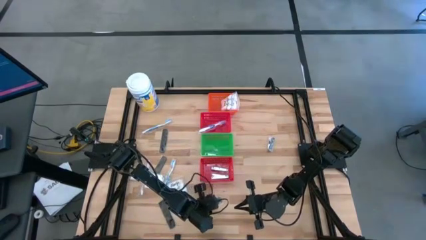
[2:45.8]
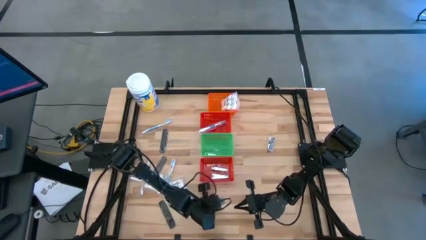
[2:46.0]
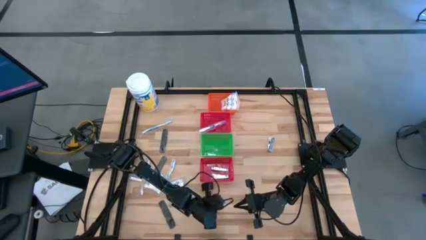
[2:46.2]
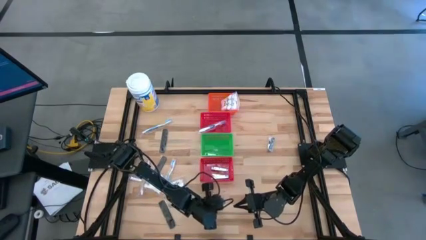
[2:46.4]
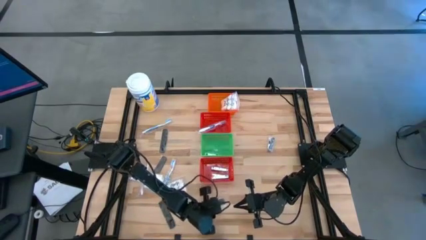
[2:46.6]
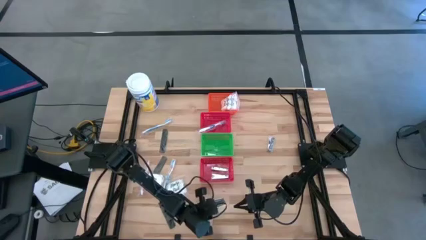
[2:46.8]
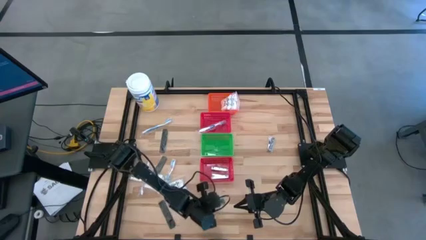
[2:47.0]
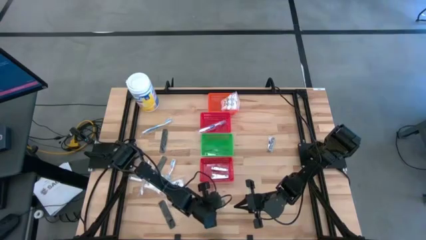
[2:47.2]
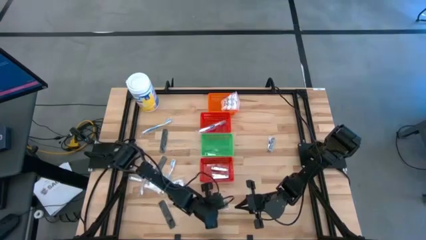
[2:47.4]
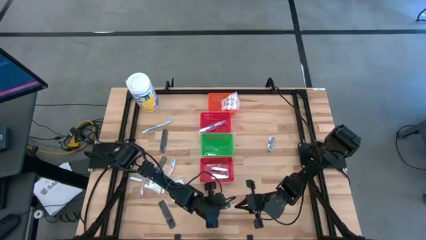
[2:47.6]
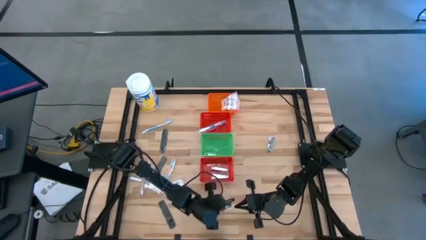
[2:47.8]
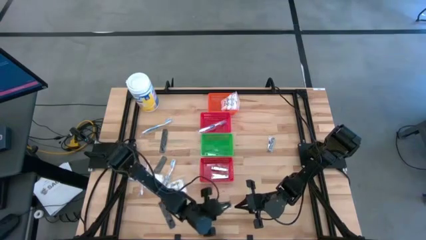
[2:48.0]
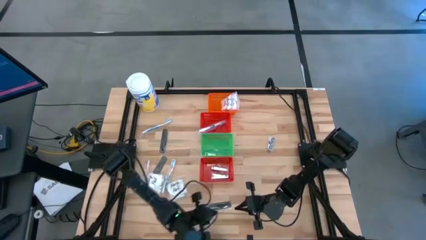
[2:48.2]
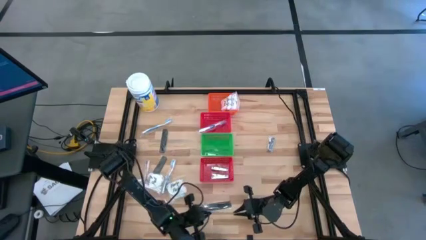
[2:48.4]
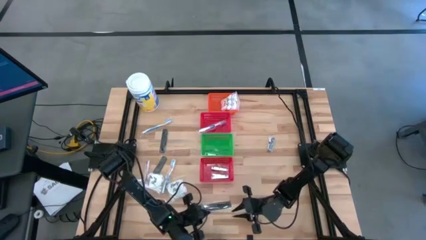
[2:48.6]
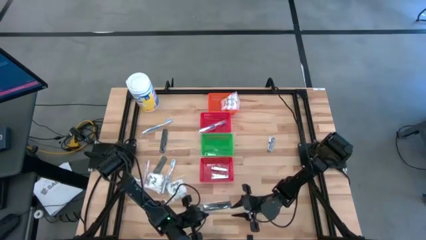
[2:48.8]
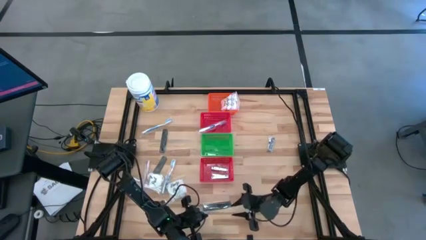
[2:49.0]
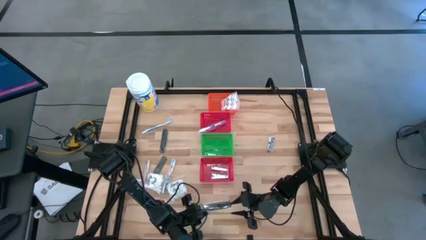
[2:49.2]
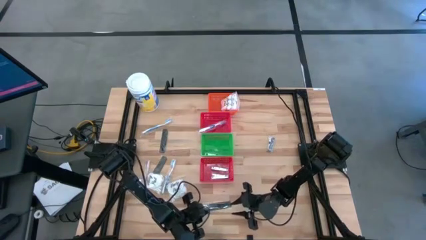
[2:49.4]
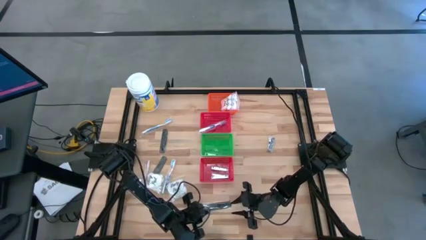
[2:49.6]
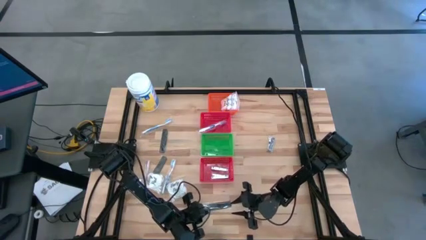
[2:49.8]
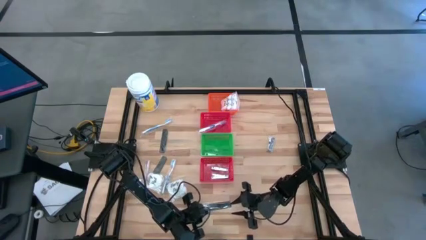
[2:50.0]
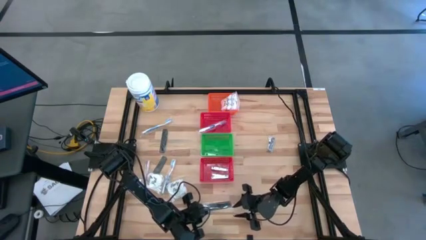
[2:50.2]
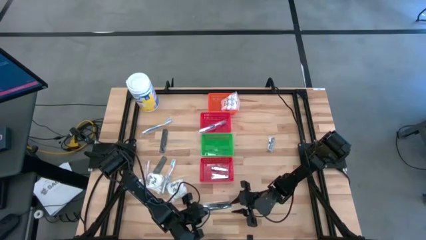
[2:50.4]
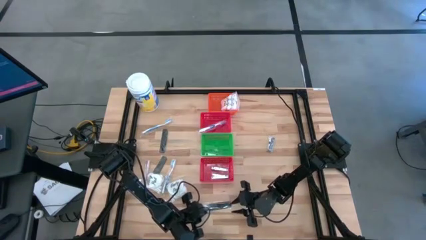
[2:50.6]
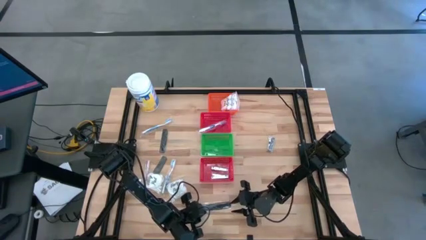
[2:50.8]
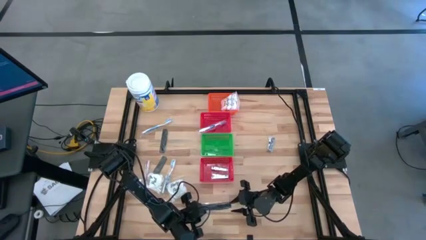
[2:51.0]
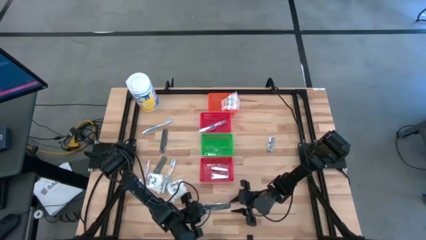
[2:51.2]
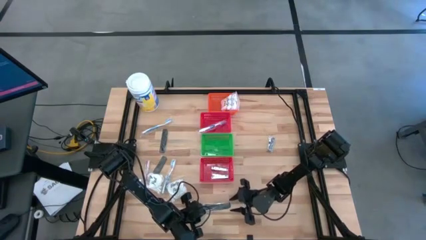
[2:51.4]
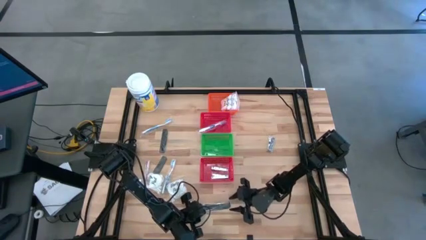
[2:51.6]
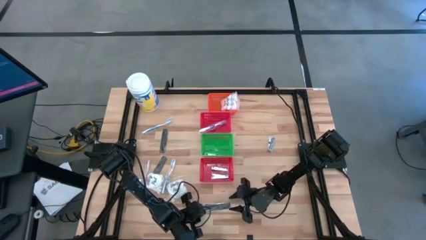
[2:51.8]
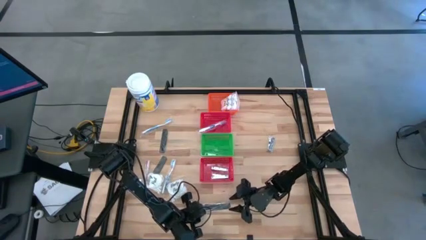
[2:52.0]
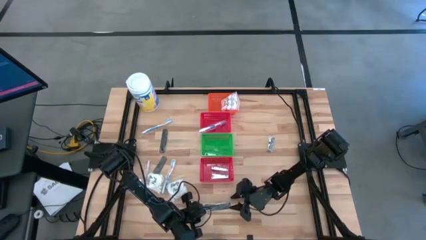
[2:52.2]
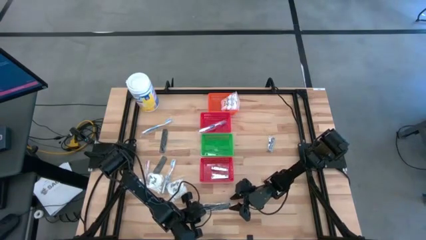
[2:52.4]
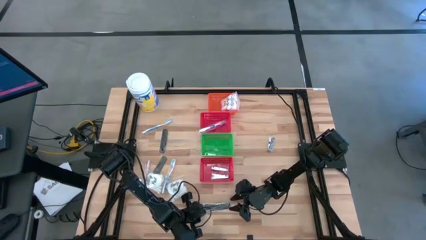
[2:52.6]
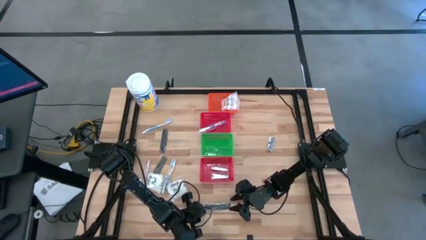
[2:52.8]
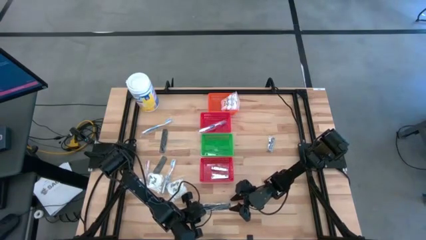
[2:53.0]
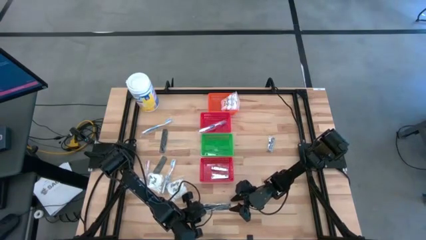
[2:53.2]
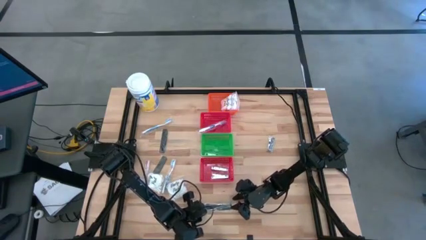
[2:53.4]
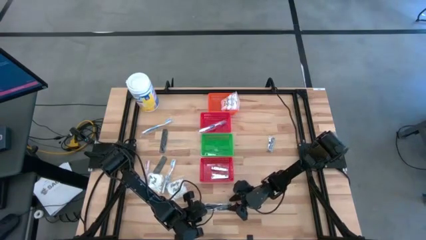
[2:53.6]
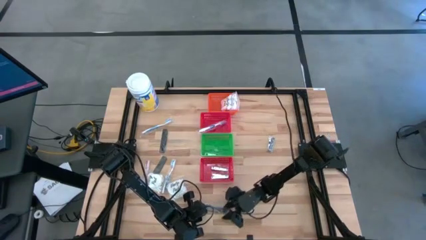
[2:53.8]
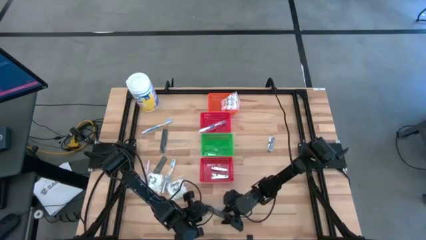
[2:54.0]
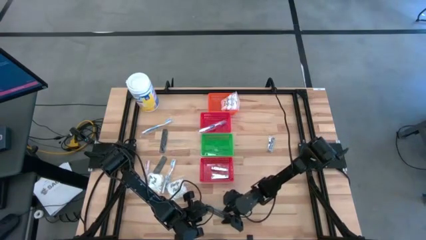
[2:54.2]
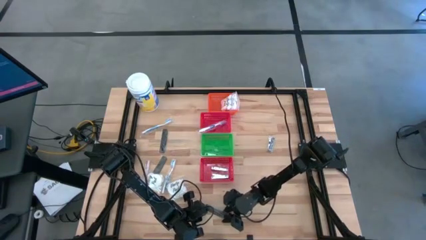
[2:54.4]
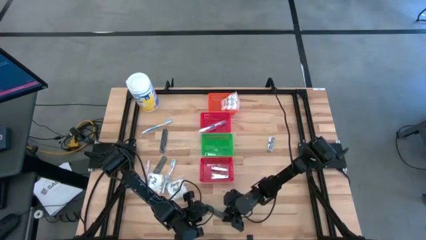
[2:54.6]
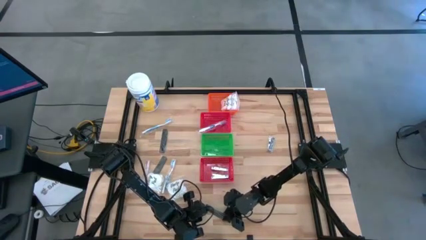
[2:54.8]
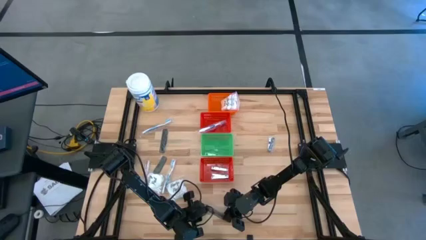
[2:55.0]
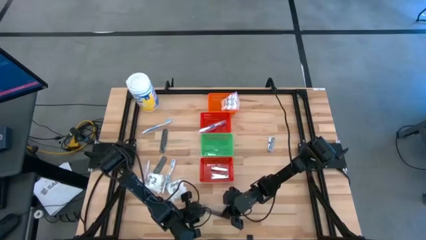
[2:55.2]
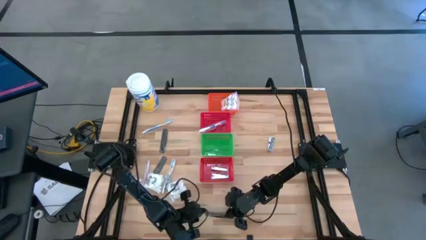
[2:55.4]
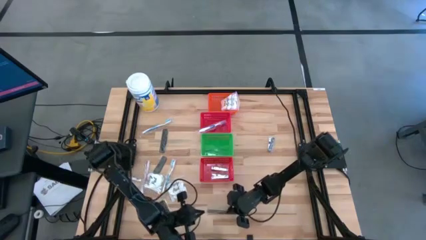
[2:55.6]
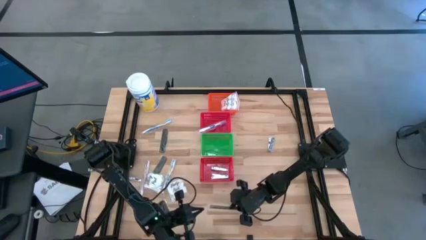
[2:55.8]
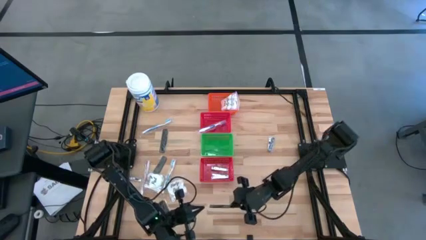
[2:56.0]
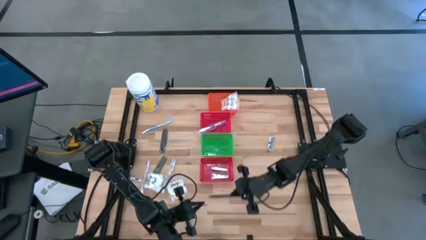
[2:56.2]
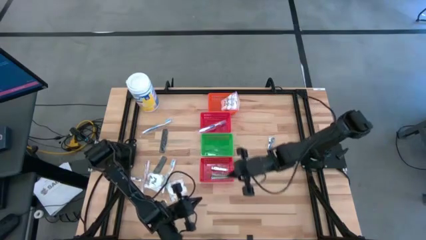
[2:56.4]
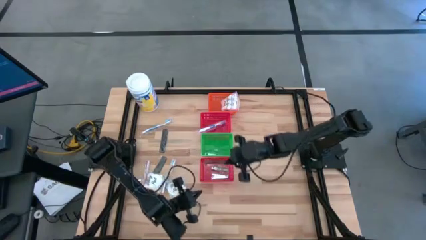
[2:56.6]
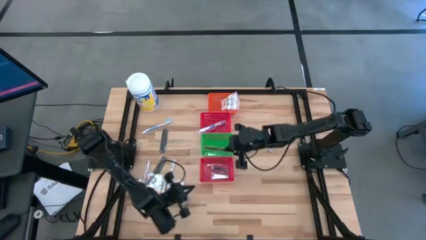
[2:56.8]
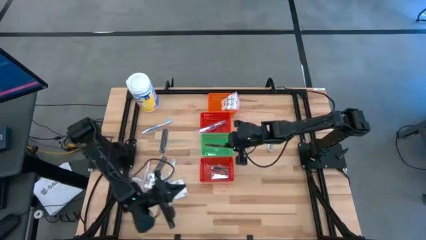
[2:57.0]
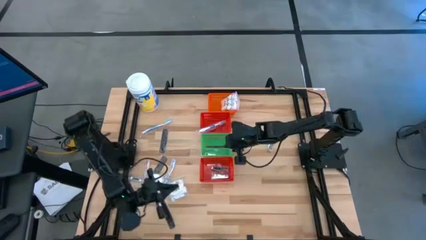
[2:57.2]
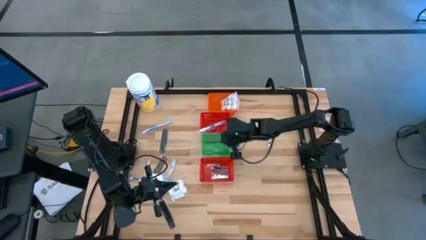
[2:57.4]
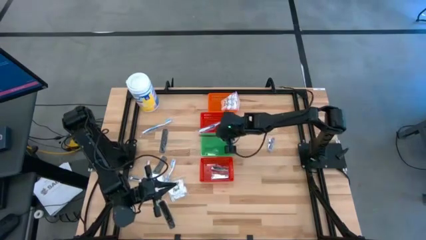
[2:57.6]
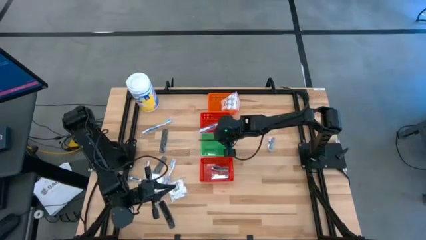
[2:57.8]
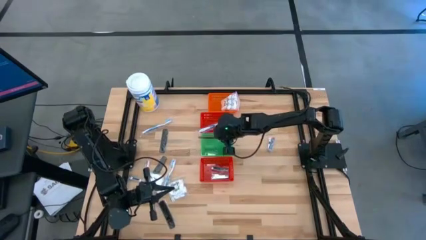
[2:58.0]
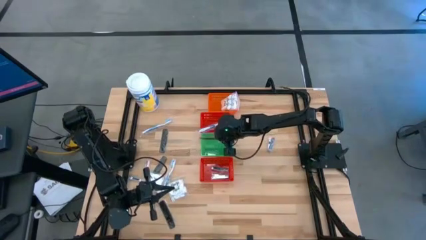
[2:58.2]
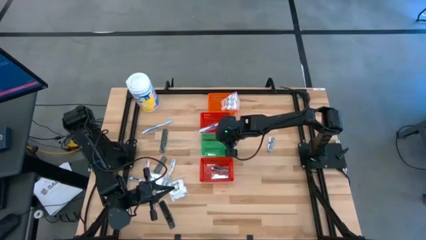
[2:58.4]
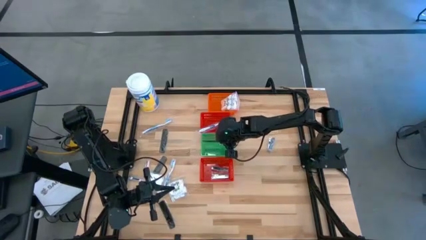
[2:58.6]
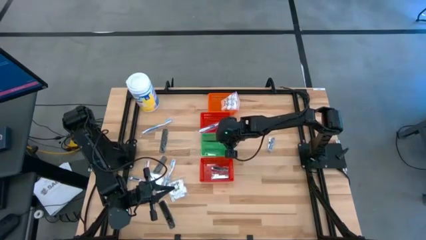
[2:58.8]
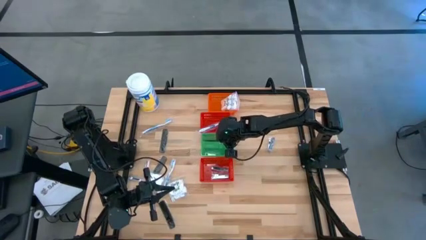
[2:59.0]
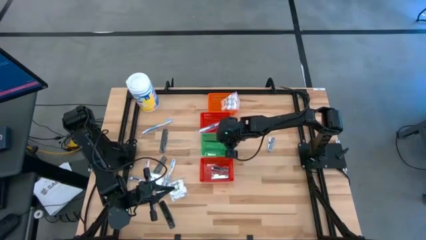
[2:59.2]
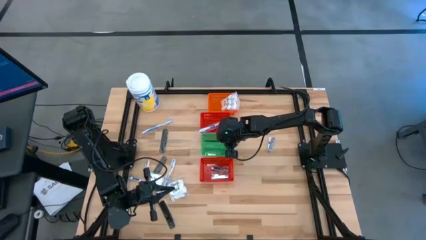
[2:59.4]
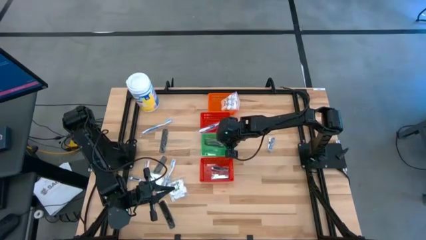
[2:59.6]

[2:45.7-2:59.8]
Task: Pick & Place Travel size toiletries
Put the black comb into the green basket
